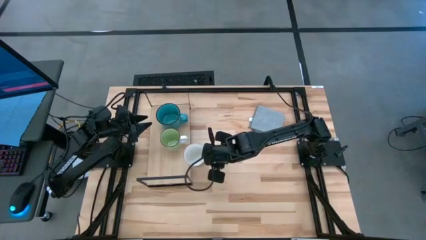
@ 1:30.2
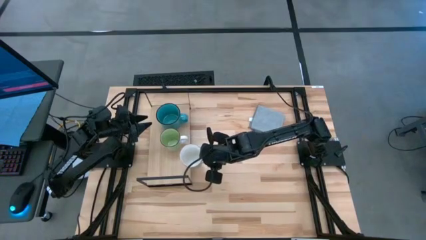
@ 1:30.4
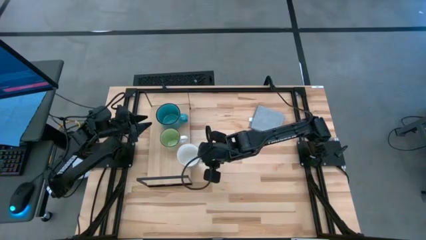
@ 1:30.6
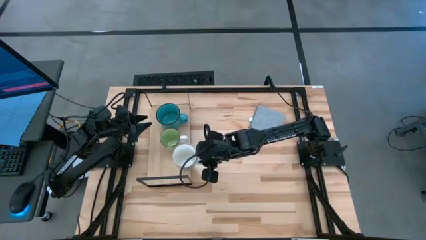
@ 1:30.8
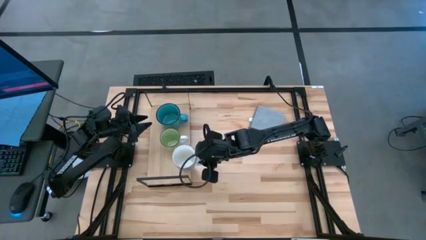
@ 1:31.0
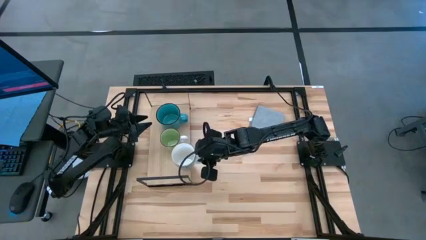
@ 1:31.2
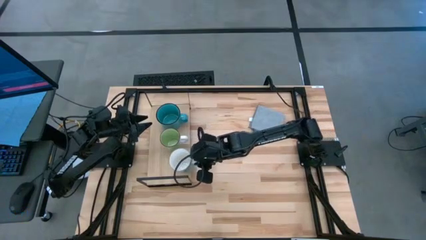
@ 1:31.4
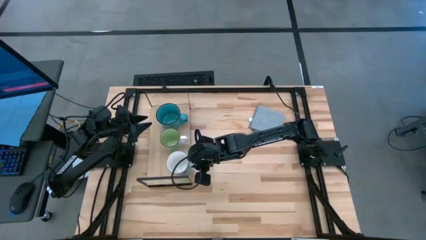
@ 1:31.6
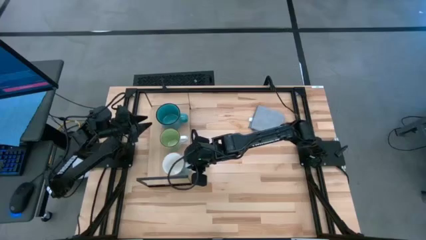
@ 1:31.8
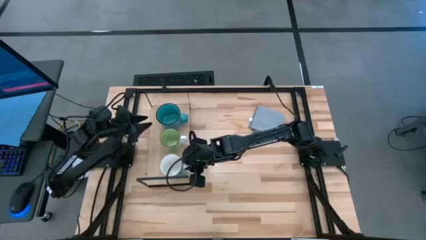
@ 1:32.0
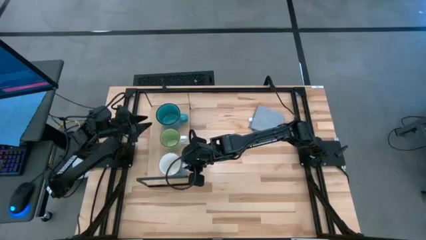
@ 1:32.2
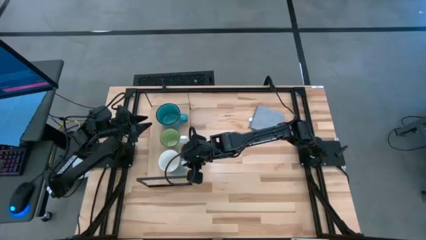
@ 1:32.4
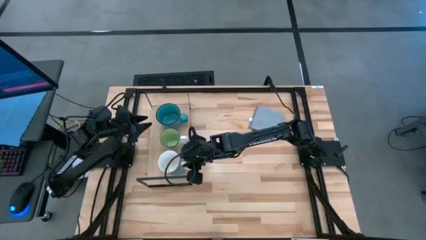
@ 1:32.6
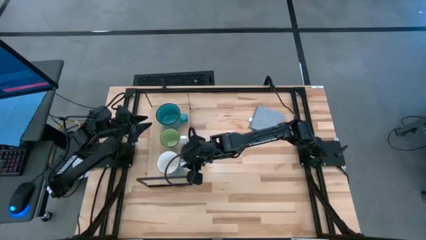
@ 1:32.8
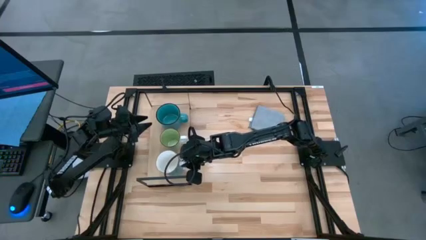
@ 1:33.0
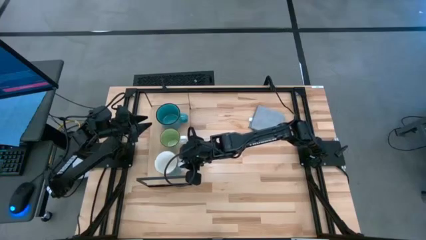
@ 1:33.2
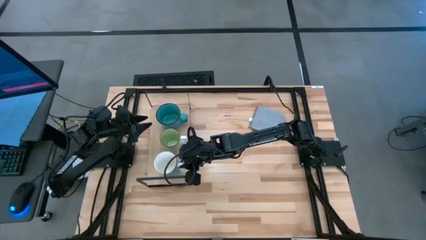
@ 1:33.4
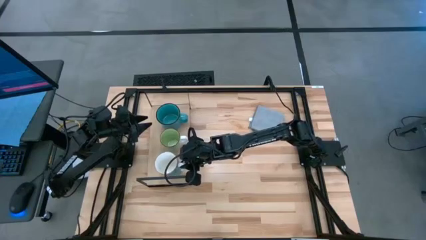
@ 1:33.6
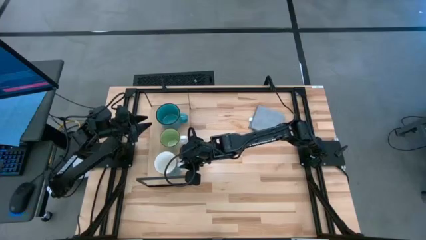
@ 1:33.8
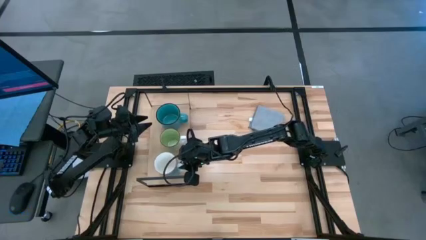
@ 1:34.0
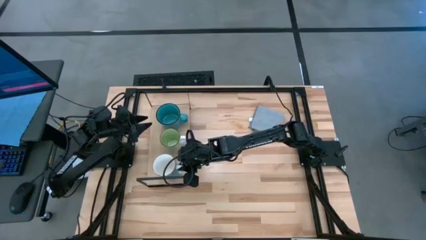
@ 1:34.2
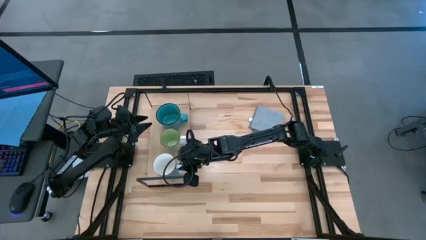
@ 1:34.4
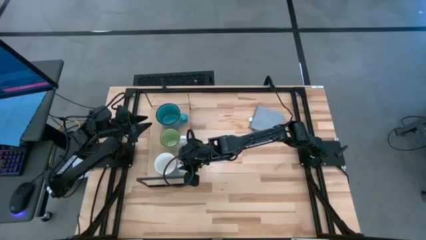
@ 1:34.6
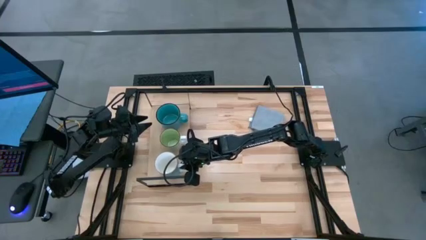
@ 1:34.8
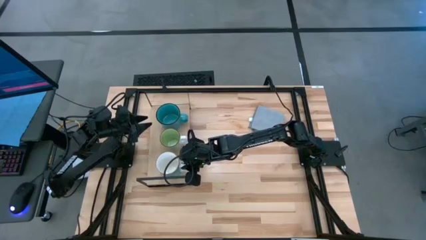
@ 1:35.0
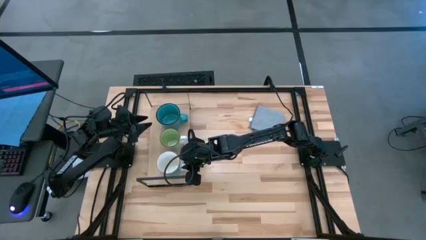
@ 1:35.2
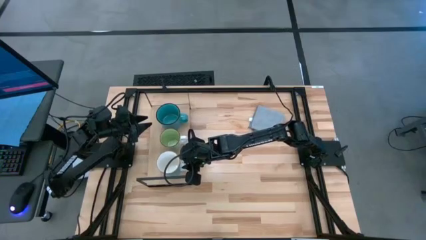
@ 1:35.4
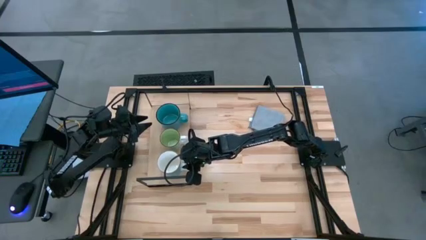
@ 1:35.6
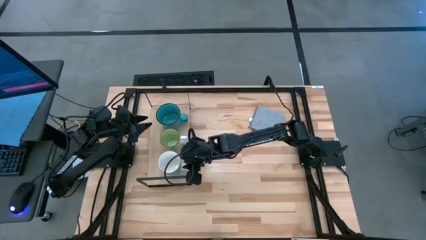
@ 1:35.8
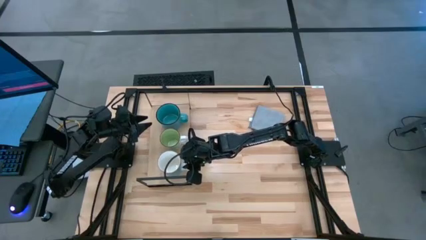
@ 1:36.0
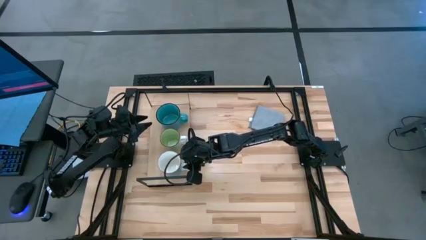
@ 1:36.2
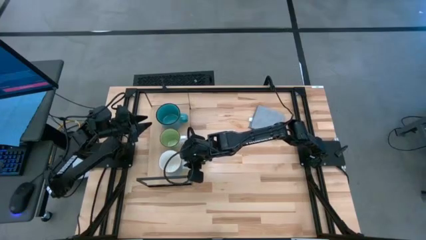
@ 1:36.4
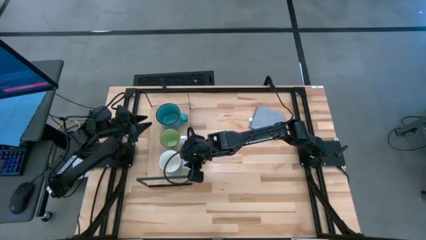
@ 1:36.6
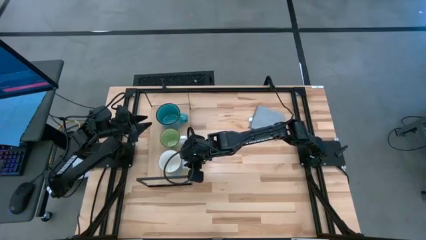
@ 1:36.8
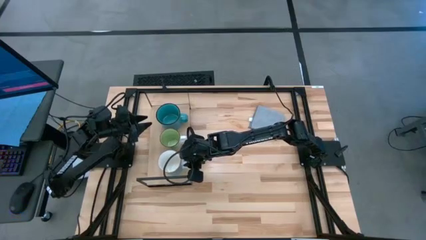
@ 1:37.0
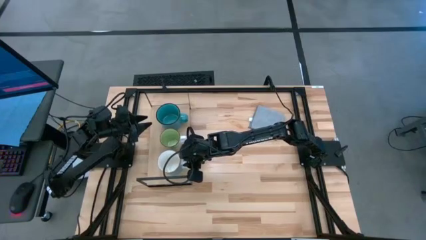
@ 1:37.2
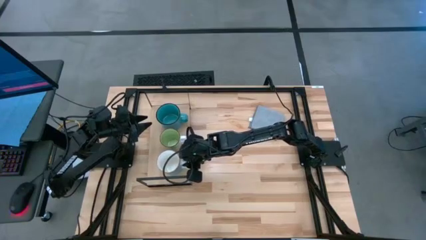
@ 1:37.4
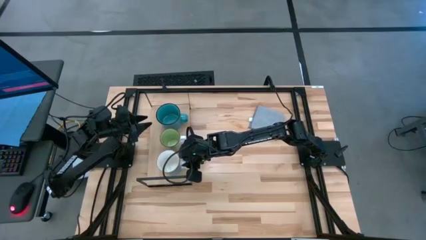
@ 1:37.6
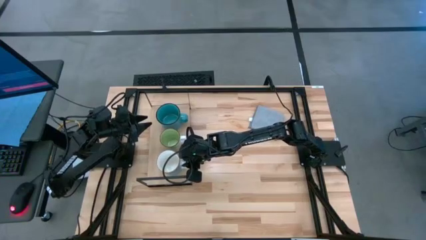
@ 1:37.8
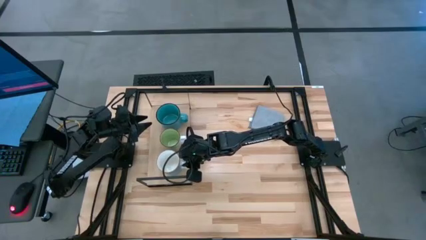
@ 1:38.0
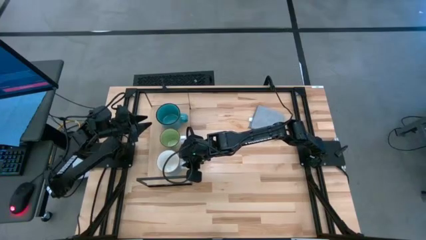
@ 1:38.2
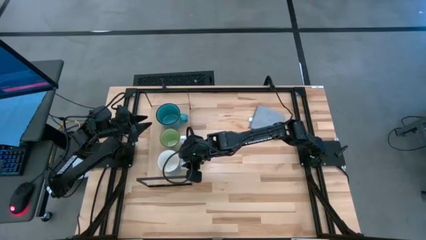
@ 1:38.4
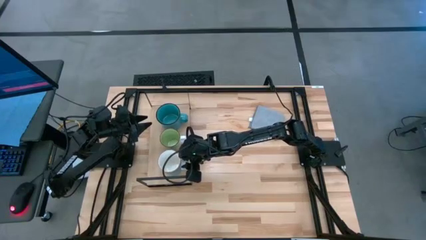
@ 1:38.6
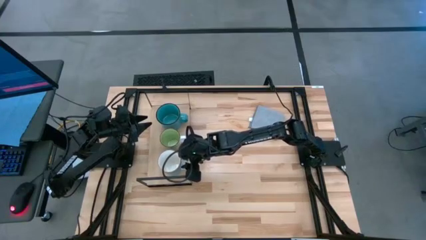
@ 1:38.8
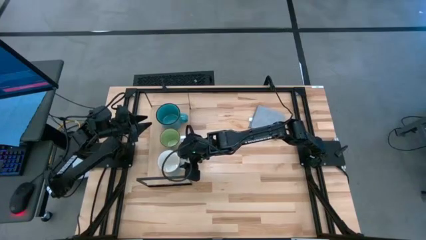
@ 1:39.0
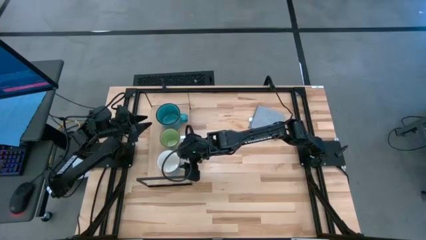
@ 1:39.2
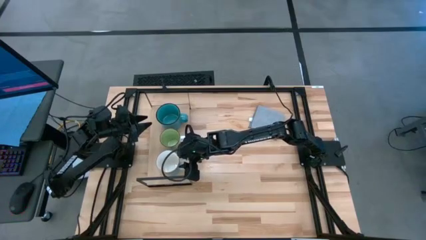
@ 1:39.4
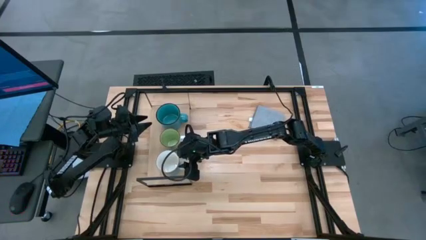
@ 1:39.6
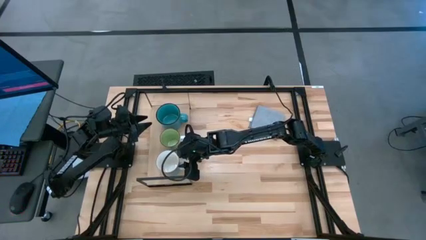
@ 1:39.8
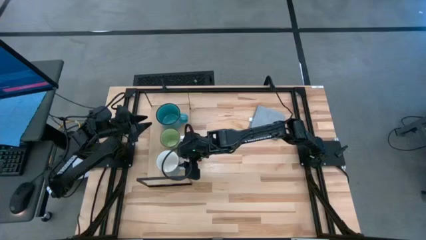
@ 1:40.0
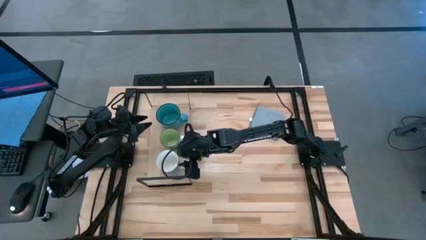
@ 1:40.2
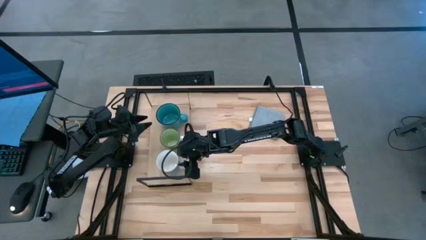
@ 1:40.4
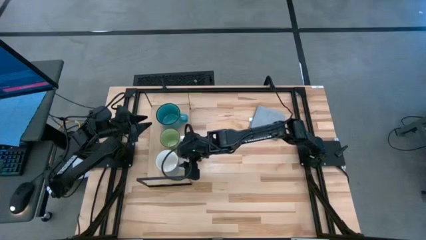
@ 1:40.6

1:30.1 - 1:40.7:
Task: Stack small to large cups/mugs on shelf
Put the white mug on the shelf

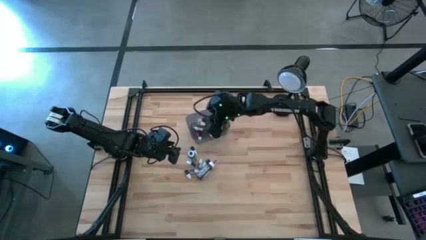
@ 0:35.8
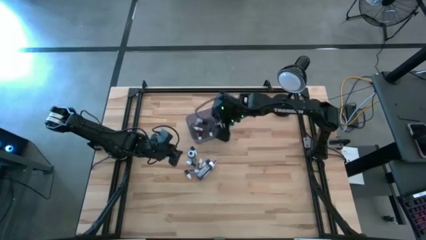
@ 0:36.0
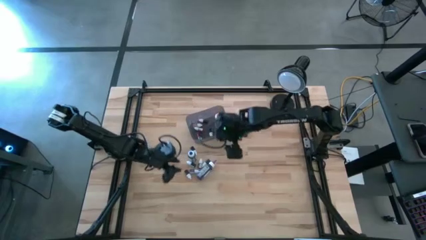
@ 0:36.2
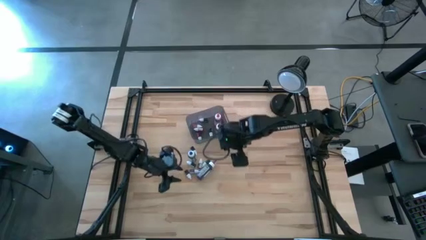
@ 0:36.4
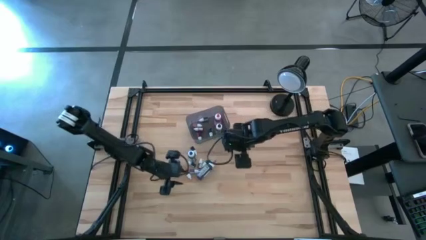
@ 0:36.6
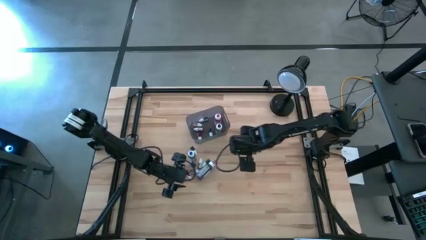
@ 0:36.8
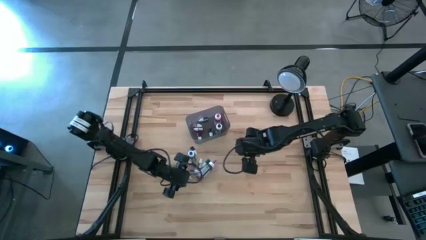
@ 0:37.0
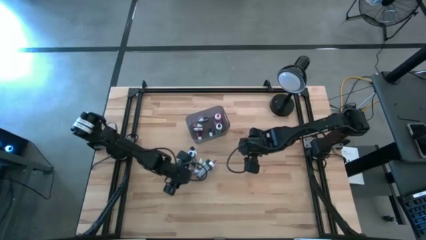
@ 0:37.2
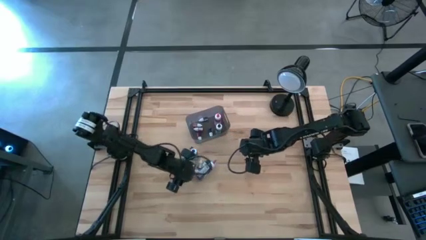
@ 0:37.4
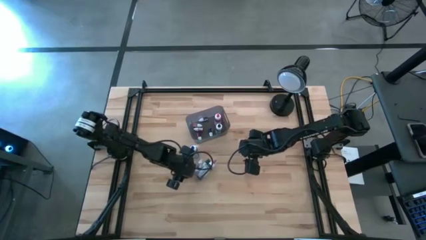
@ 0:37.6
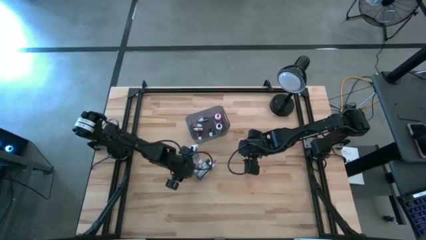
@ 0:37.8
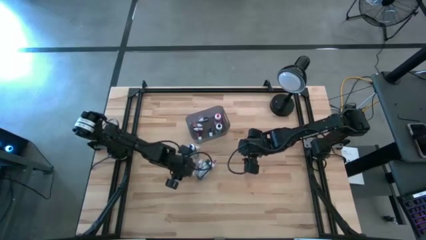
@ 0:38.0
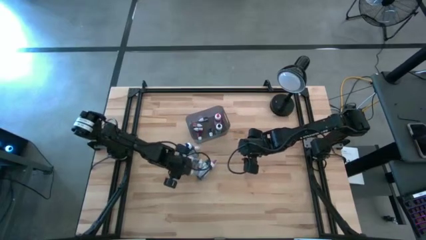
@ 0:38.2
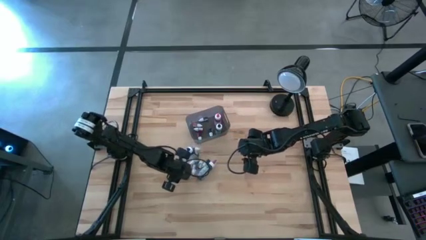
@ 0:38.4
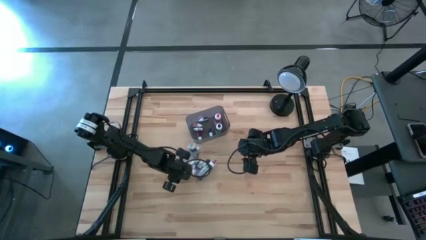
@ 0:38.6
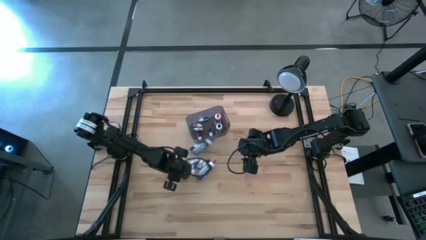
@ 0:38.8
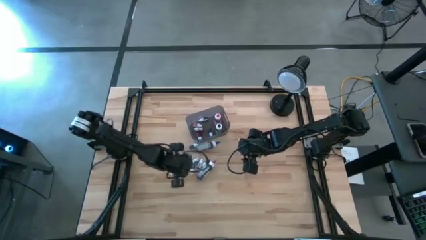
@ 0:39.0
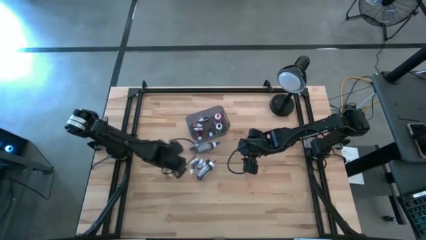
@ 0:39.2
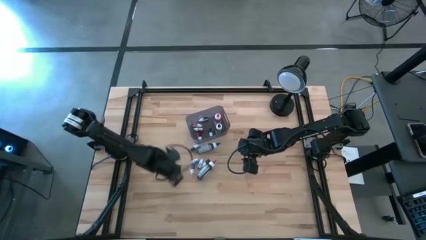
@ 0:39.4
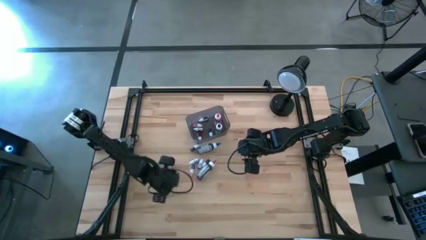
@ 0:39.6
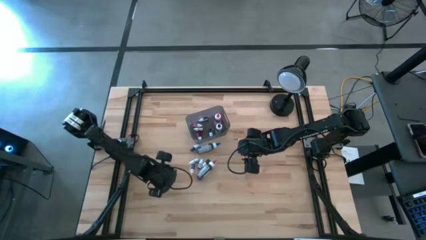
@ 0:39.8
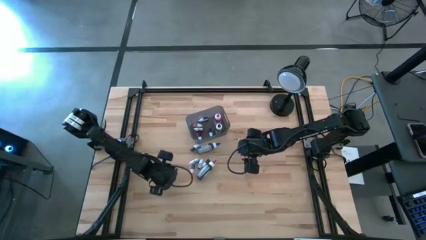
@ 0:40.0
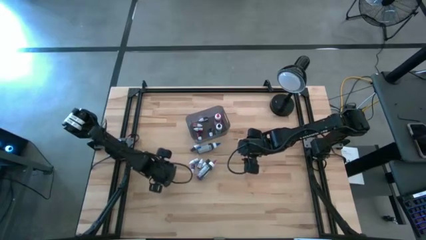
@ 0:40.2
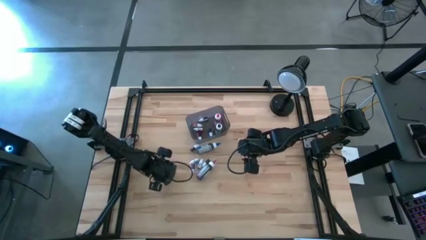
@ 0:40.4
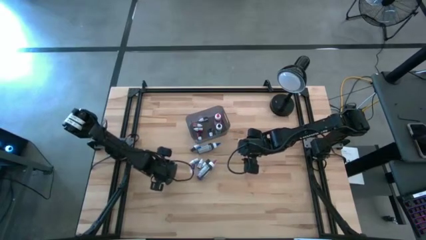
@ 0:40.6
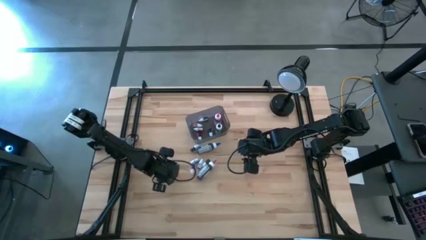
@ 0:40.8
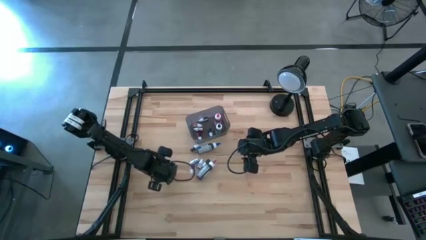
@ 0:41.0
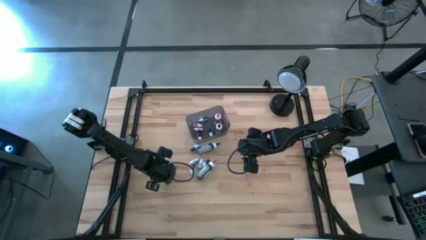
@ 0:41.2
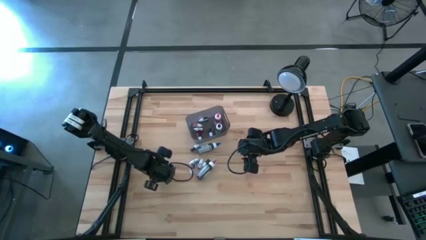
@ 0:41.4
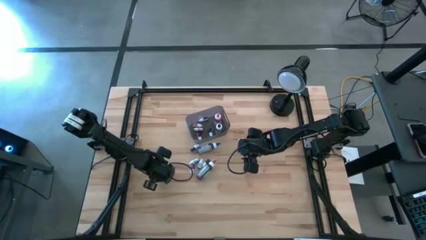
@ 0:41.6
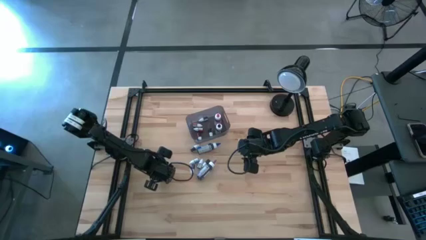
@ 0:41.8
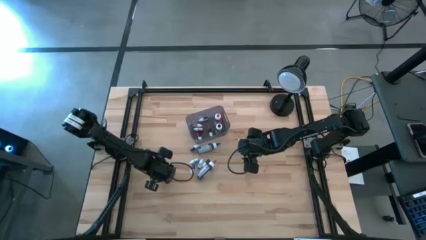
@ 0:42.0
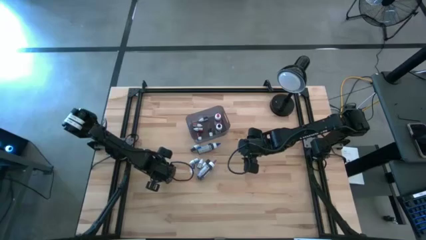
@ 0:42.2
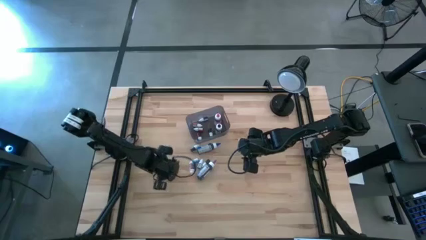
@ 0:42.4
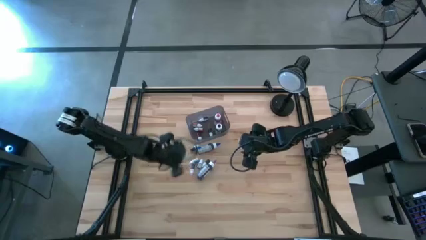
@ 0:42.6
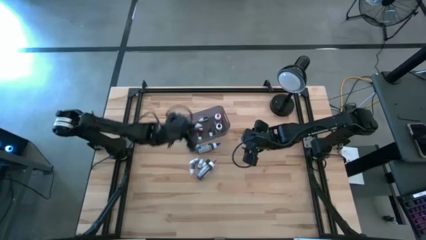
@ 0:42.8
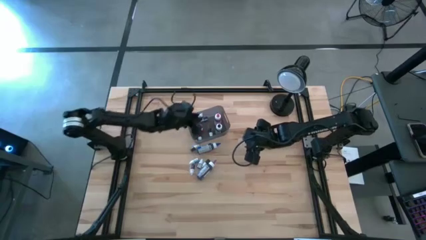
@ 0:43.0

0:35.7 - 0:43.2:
Task: Pick & Place food coloring
Put the small green food coloring bottle into the gray bin
